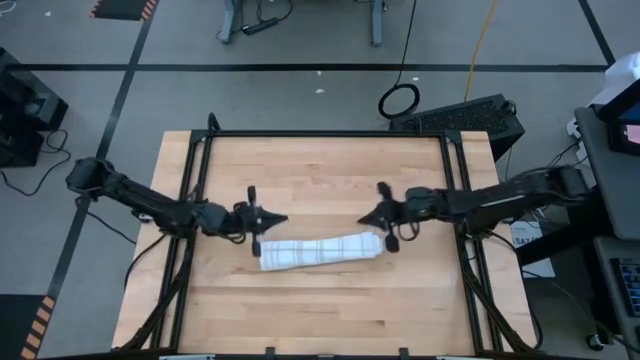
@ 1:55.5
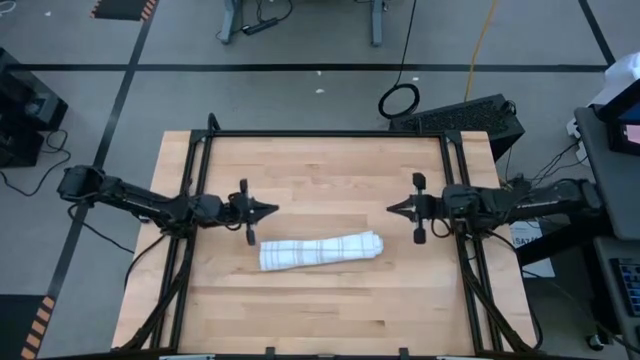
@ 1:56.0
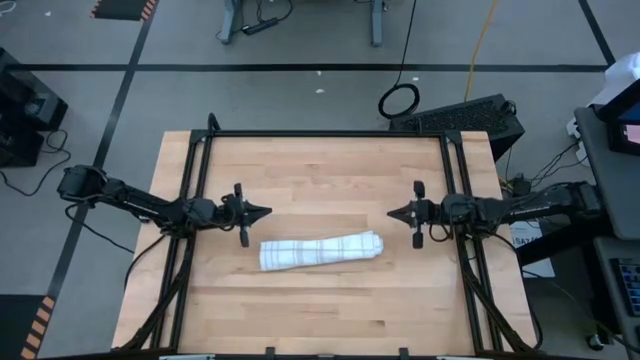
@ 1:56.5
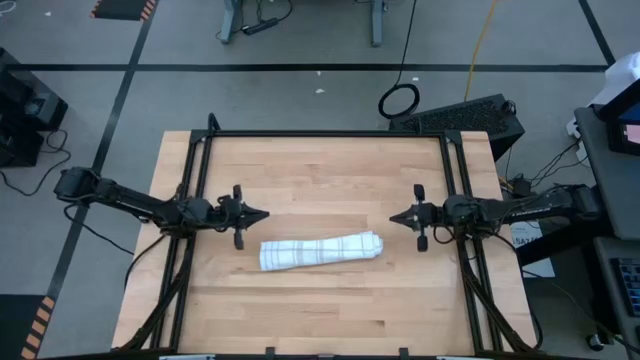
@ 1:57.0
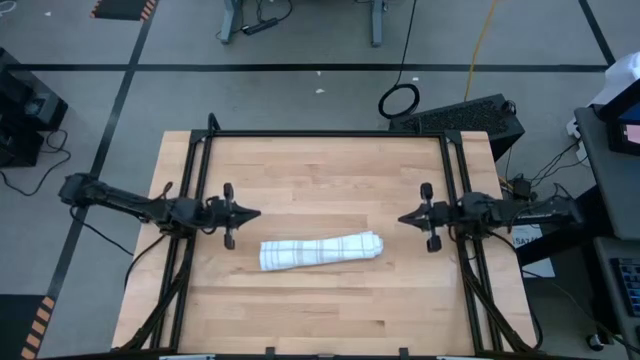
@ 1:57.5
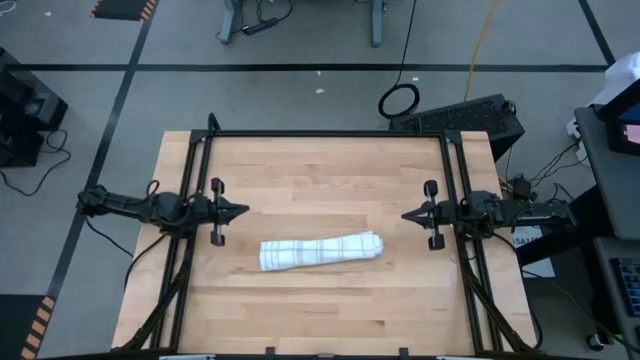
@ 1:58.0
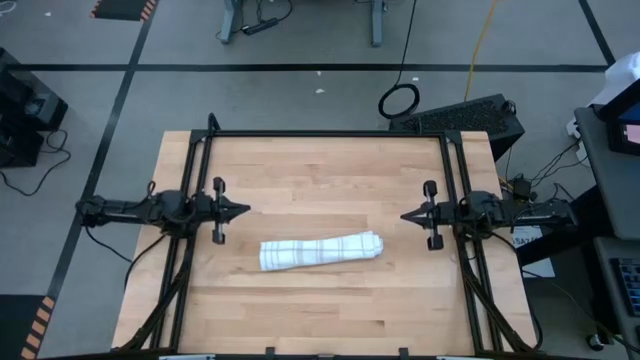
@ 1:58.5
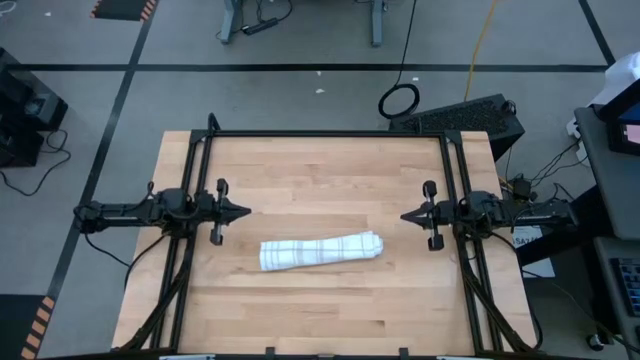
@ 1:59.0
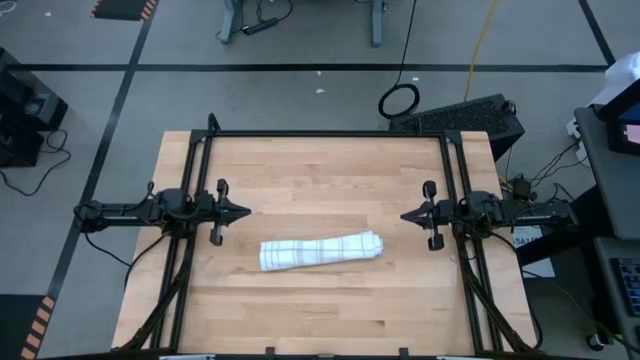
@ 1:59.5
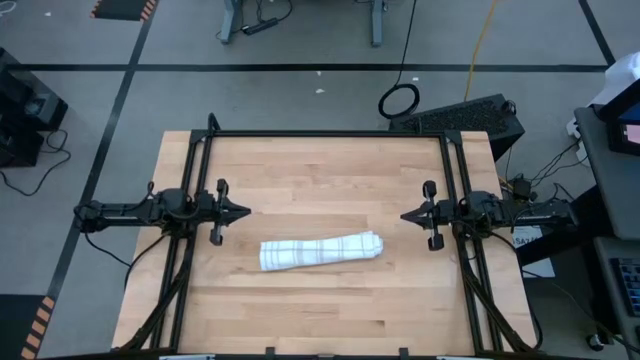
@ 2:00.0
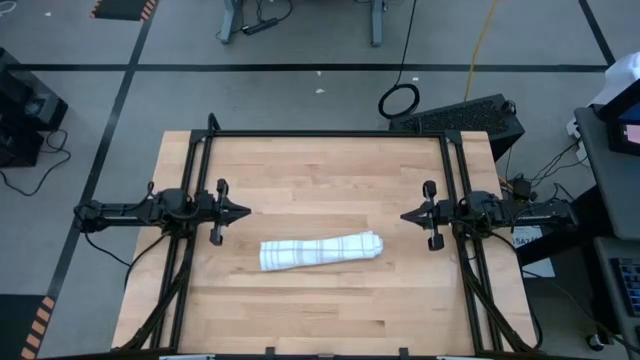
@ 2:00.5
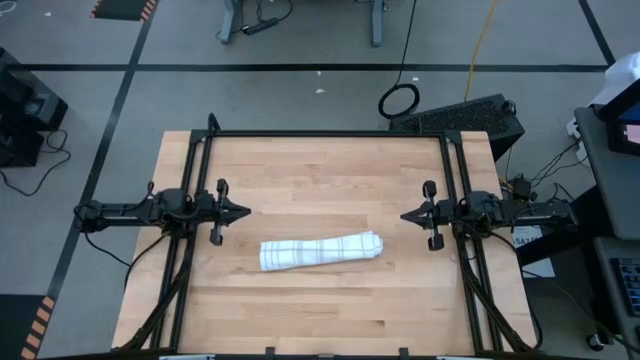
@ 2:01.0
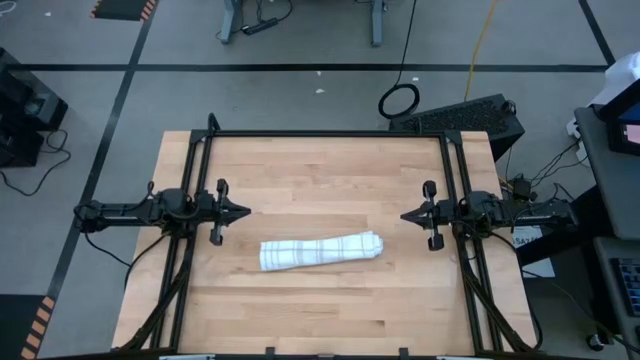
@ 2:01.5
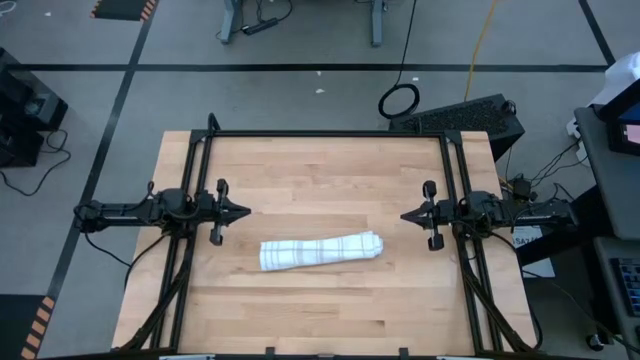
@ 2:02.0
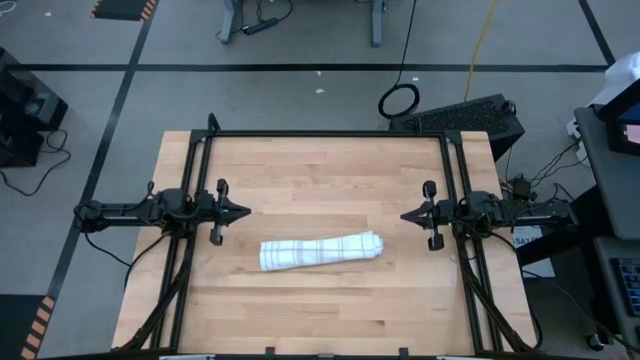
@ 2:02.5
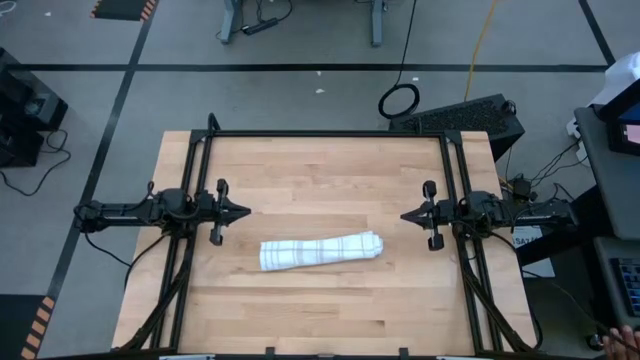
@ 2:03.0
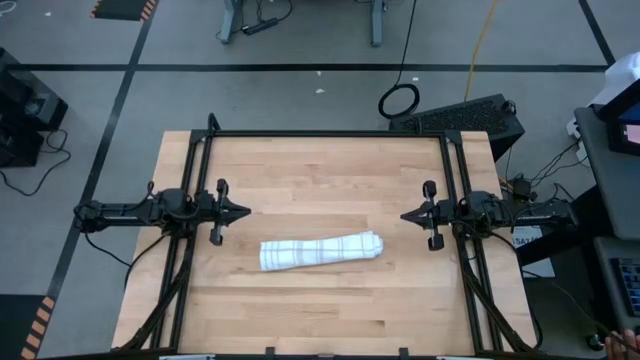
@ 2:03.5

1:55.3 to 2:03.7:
Task: Roll towel
Return to Home Position

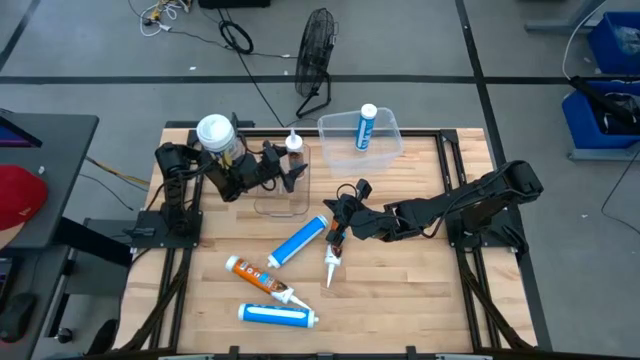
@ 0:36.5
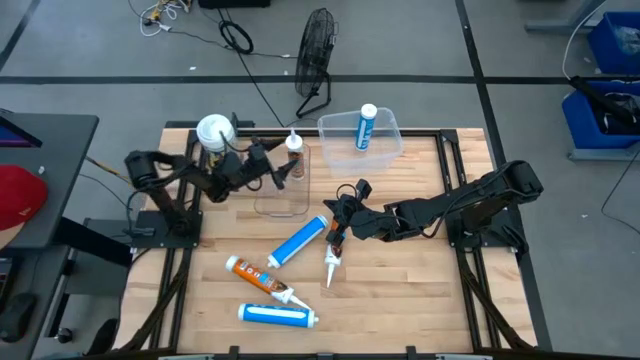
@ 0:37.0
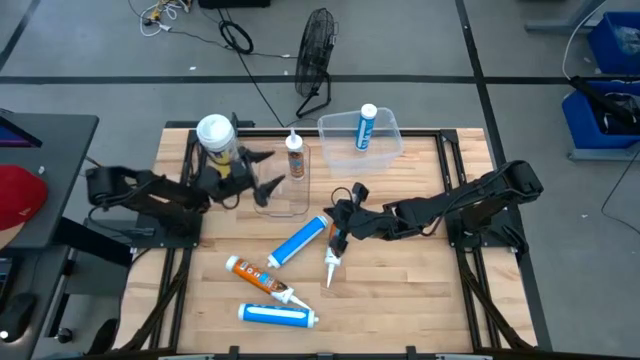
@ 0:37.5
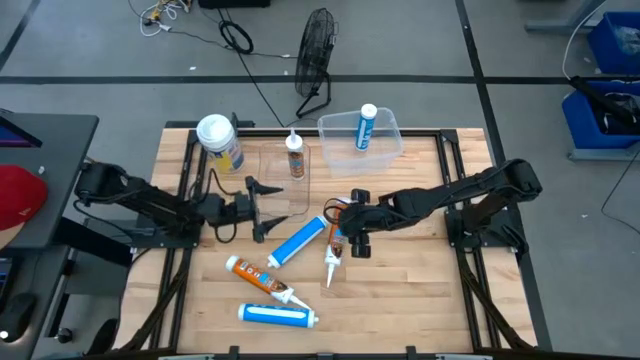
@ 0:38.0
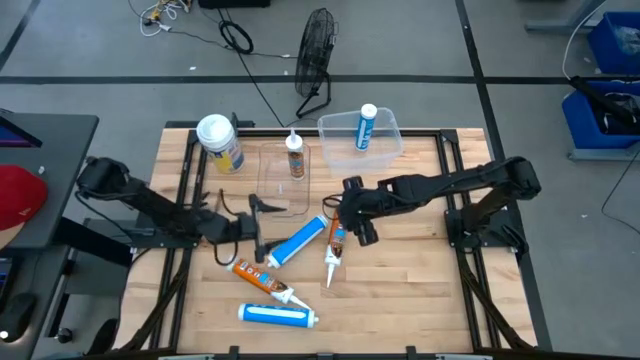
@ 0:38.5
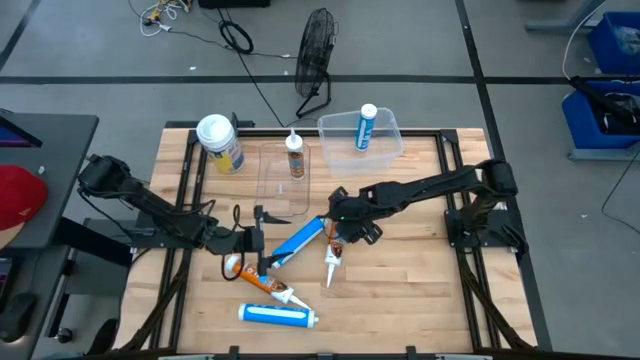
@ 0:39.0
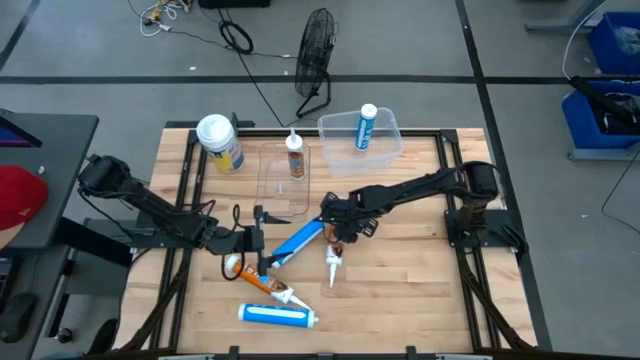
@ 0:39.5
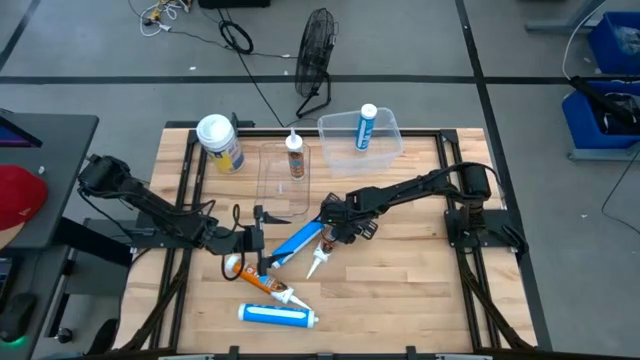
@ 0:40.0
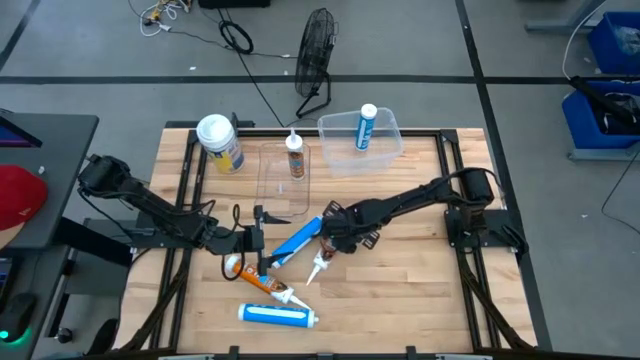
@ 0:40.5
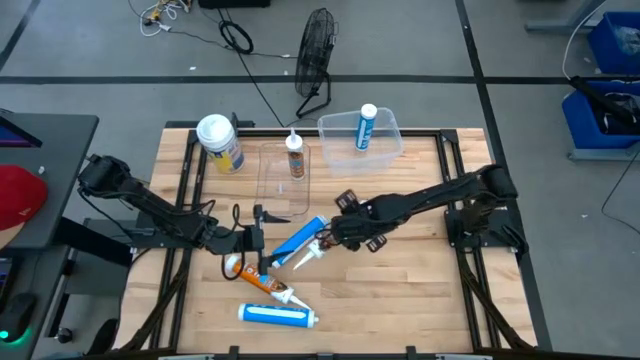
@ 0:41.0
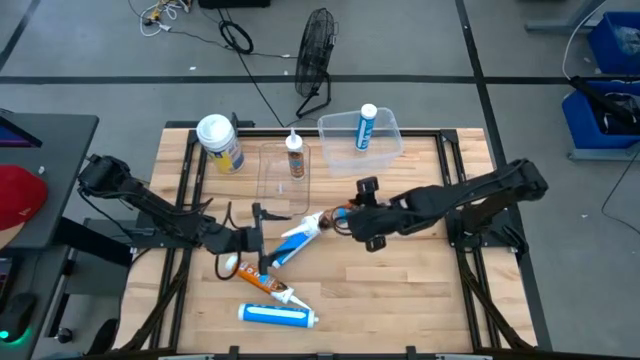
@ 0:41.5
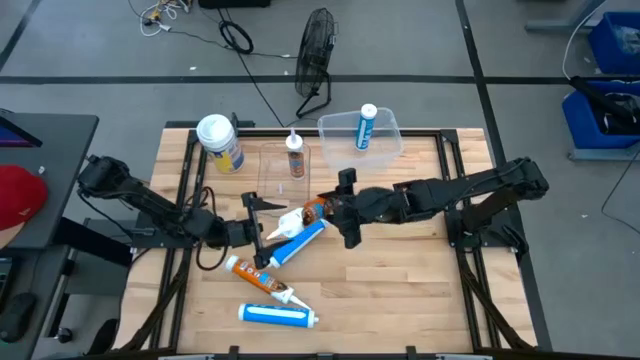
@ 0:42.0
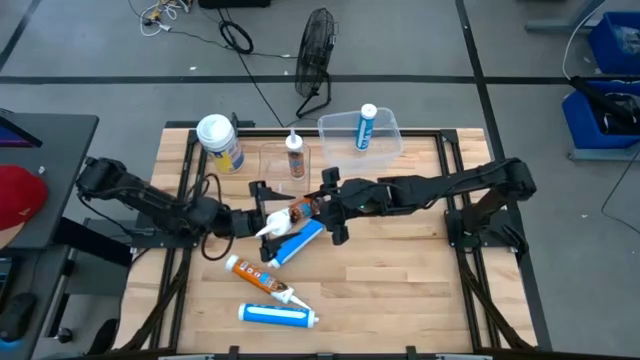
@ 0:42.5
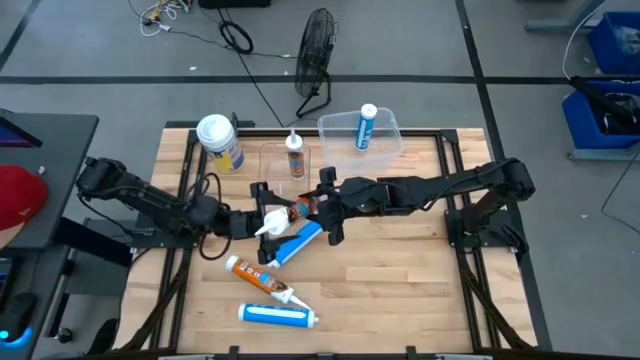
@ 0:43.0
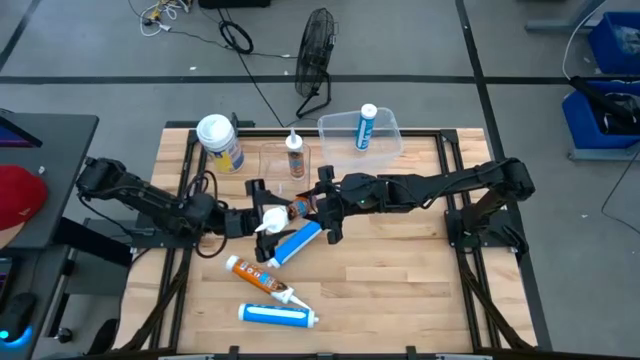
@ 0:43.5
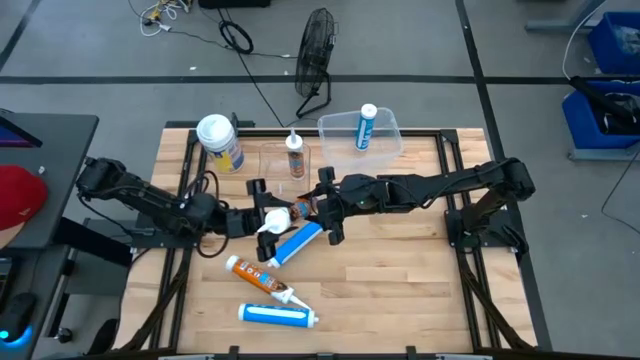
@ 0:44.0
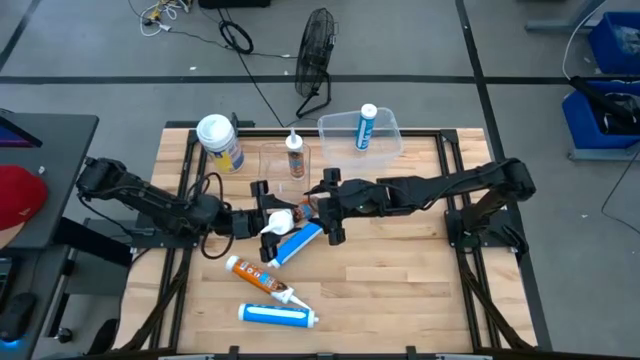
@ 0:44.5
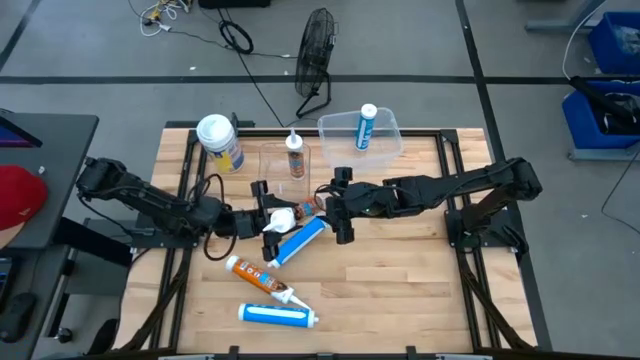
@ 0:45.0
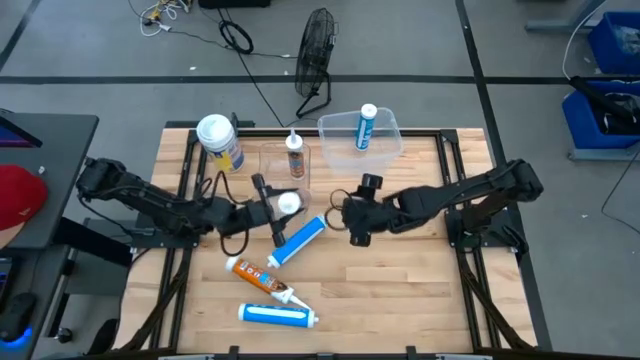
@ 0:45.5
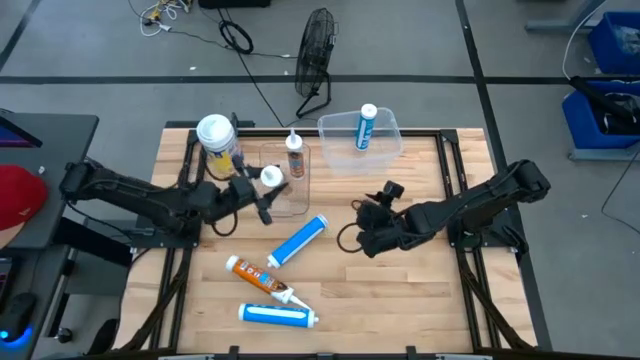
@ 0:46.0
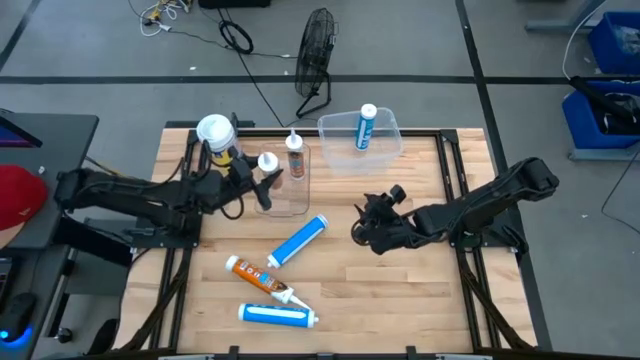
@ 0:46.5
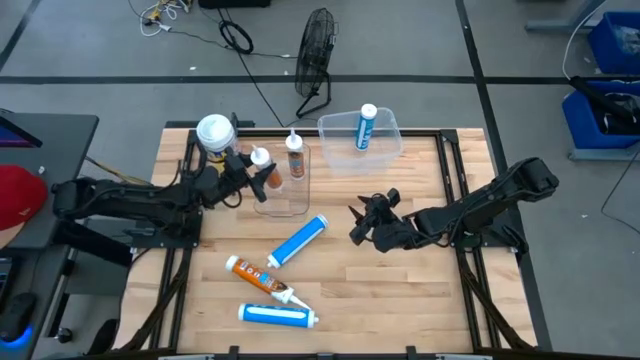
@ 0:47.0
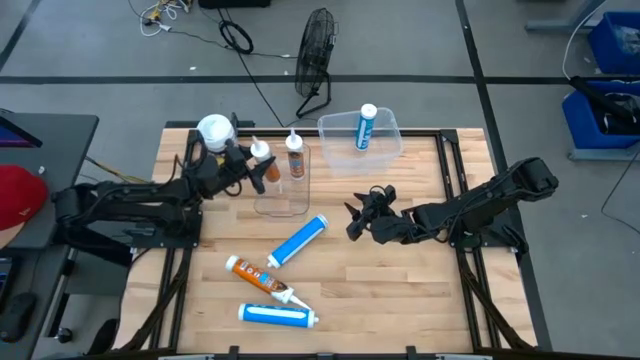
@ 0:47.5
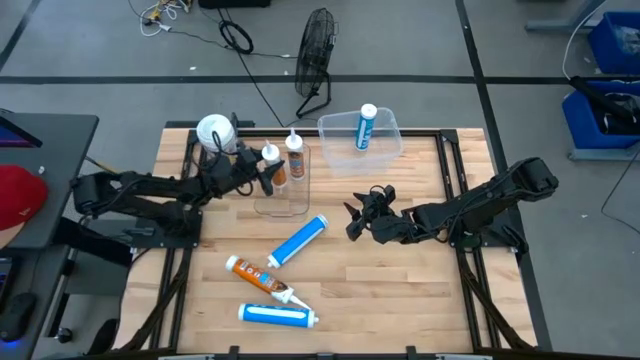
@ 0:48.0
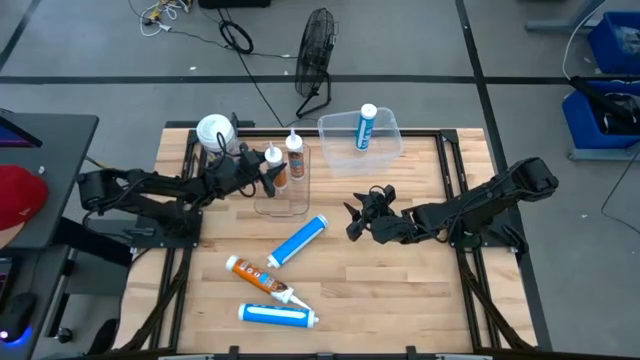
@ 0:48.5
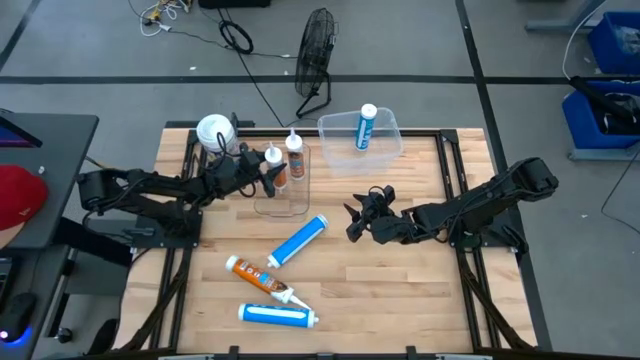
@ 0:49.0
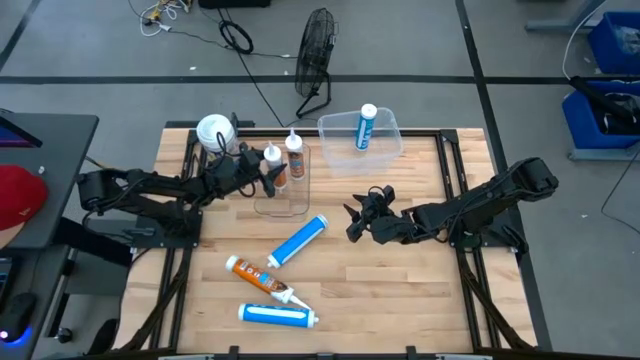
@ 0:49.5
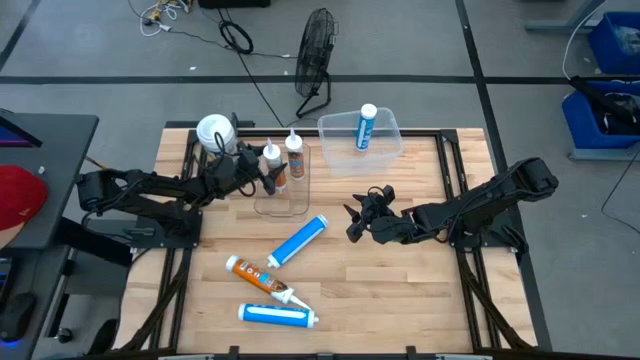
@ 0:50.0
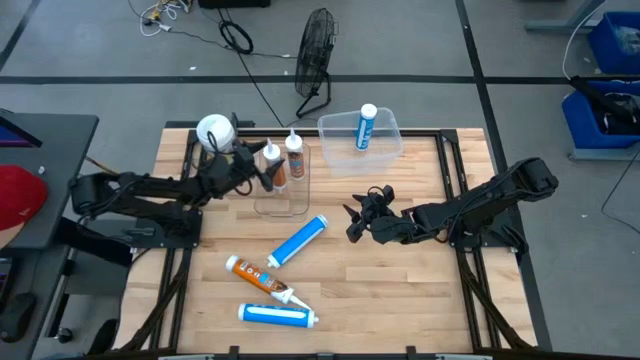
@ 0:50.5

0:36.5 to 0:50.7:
Task: Pick & place silicon tubes, Sealant and Lysol wipes
Put the right orange sealant into the transparent bin
